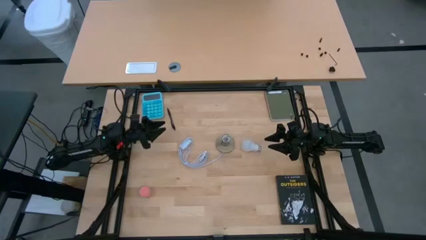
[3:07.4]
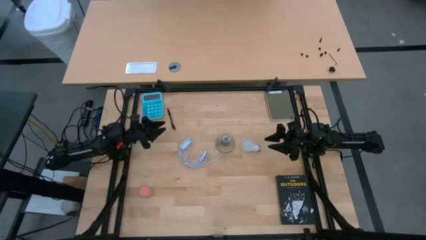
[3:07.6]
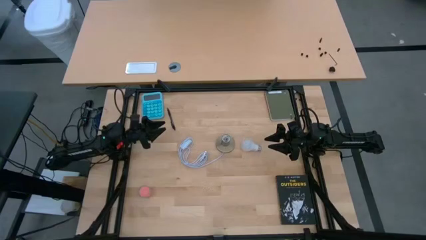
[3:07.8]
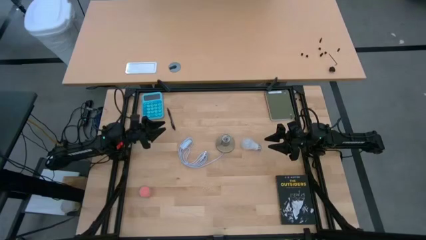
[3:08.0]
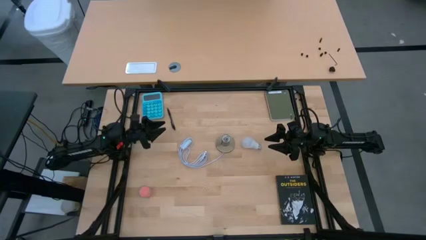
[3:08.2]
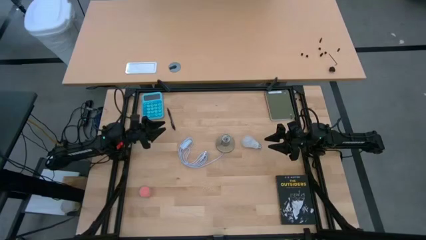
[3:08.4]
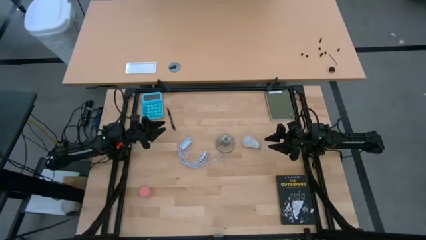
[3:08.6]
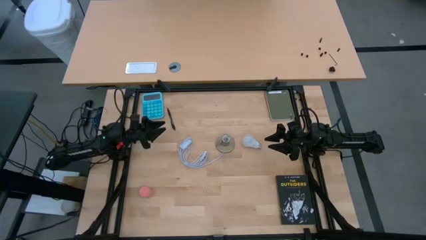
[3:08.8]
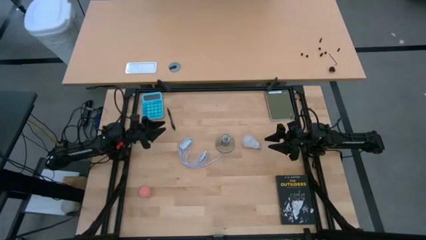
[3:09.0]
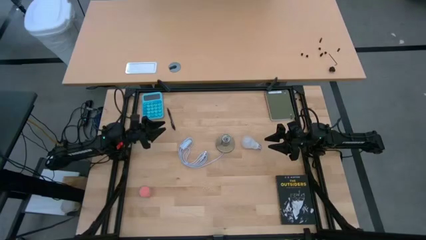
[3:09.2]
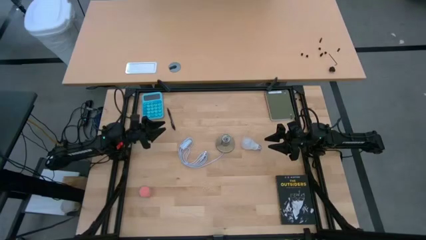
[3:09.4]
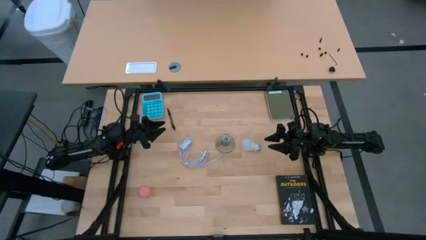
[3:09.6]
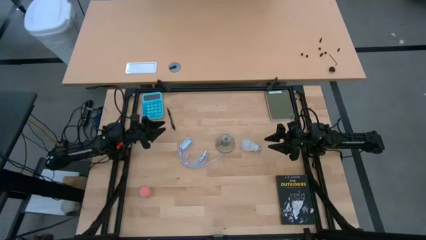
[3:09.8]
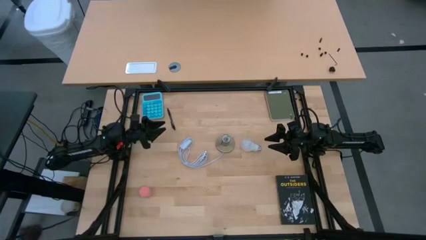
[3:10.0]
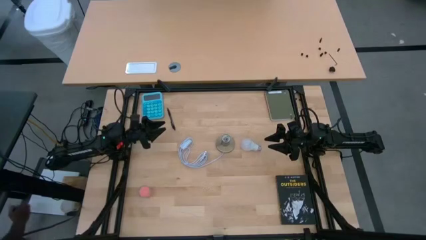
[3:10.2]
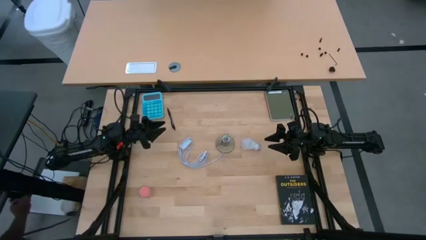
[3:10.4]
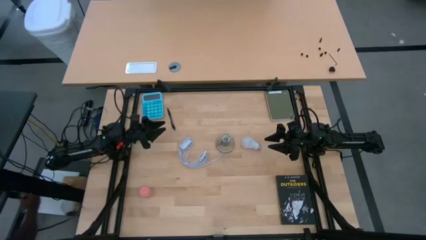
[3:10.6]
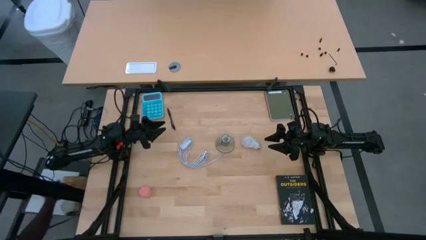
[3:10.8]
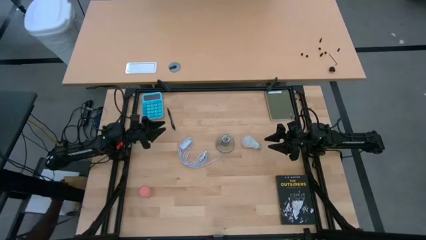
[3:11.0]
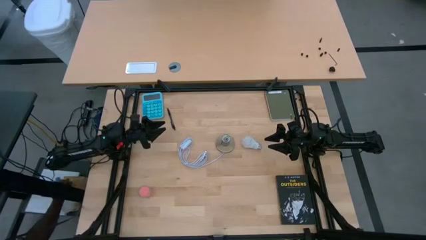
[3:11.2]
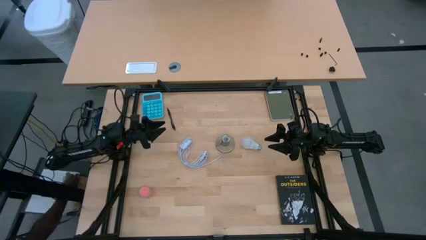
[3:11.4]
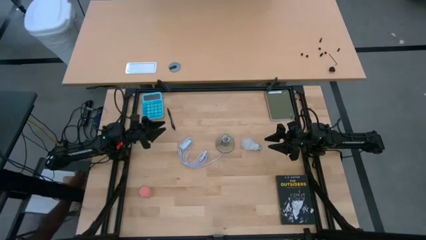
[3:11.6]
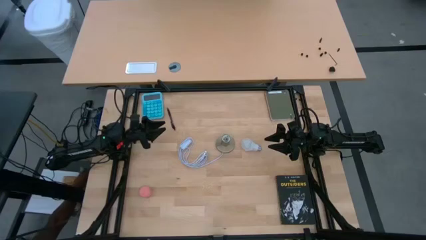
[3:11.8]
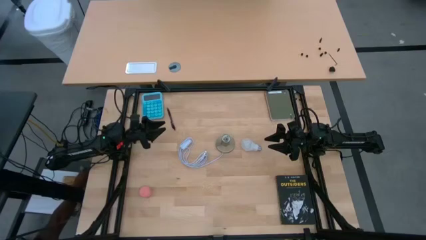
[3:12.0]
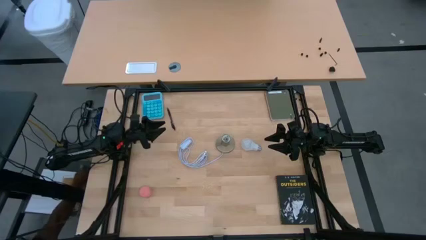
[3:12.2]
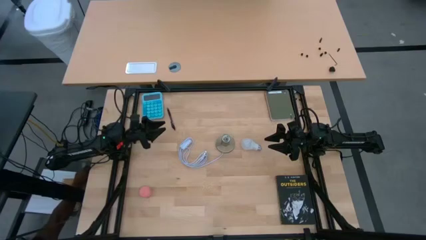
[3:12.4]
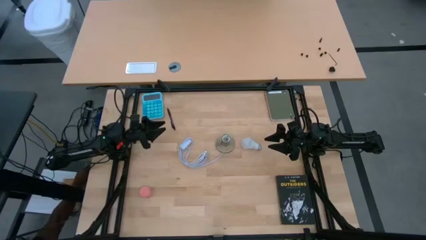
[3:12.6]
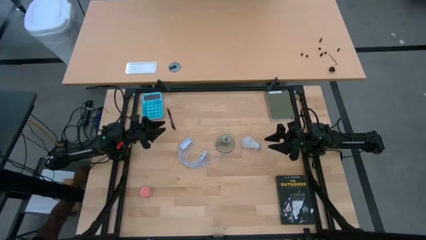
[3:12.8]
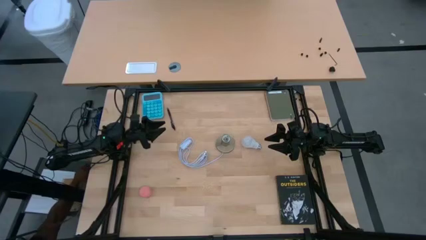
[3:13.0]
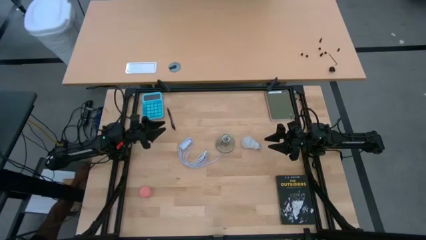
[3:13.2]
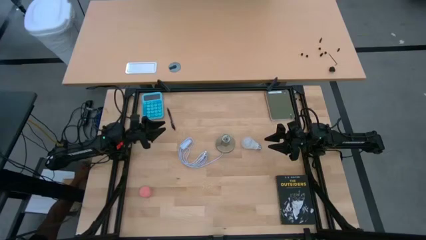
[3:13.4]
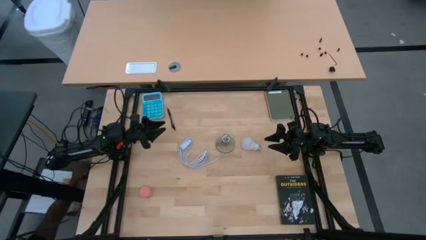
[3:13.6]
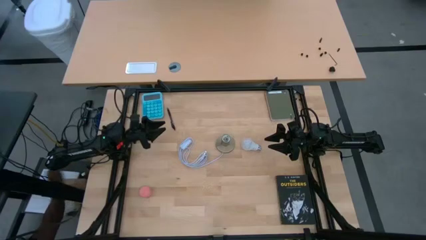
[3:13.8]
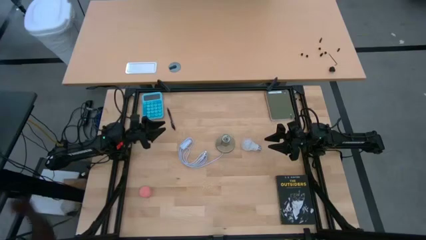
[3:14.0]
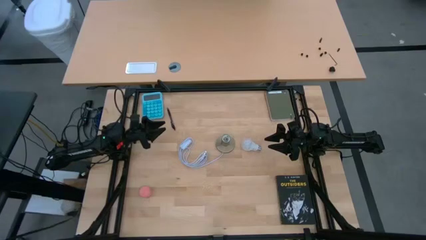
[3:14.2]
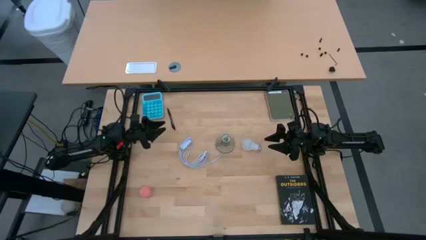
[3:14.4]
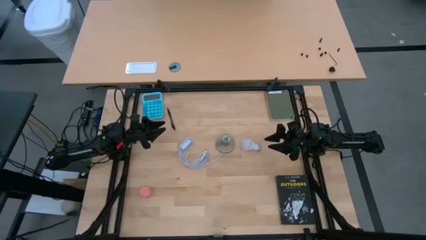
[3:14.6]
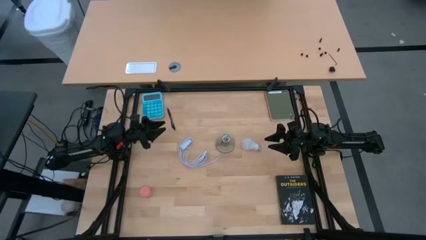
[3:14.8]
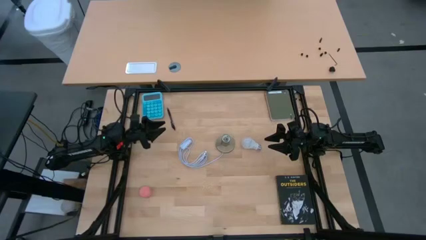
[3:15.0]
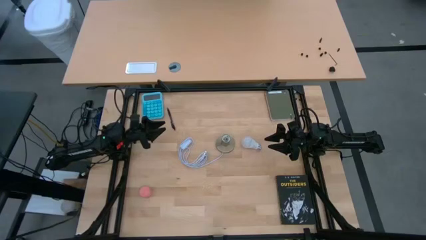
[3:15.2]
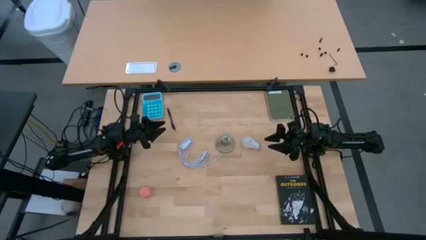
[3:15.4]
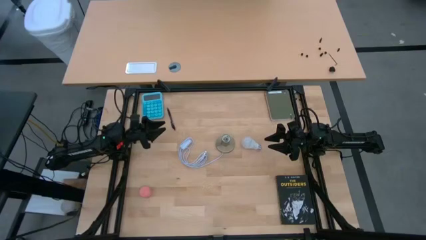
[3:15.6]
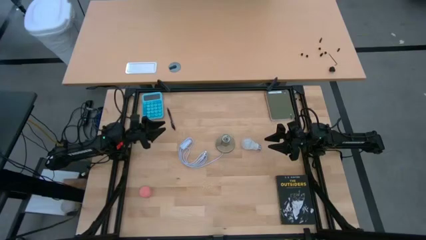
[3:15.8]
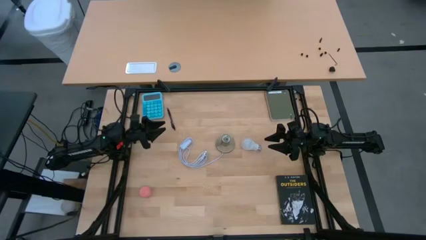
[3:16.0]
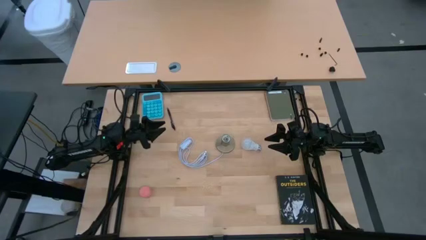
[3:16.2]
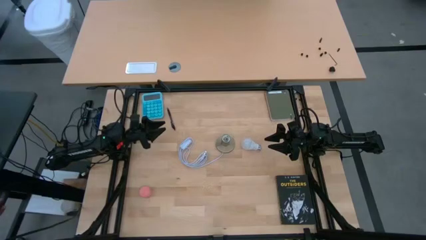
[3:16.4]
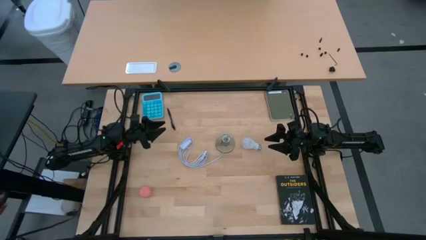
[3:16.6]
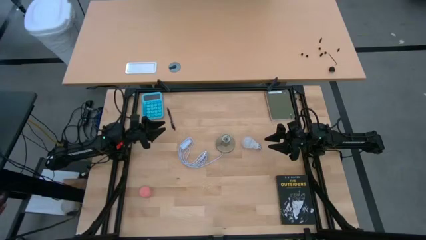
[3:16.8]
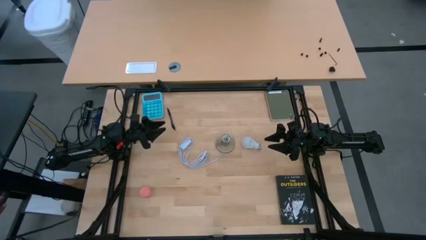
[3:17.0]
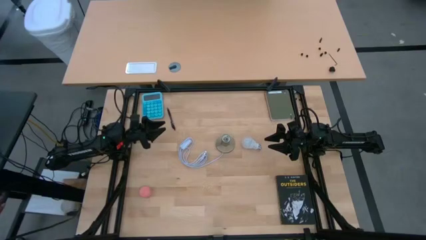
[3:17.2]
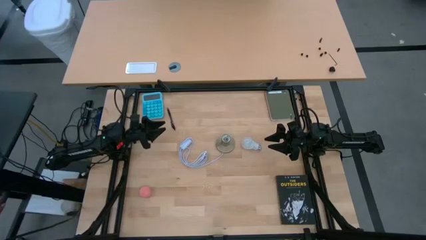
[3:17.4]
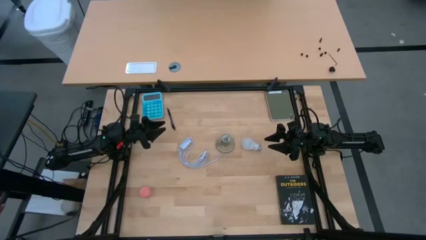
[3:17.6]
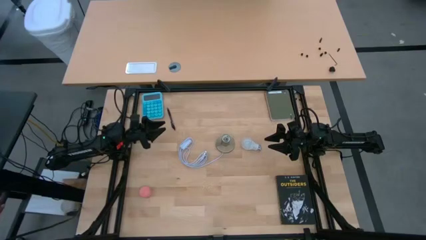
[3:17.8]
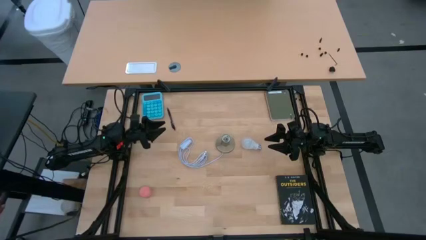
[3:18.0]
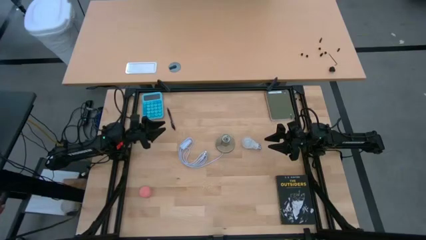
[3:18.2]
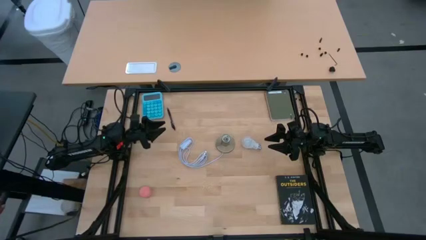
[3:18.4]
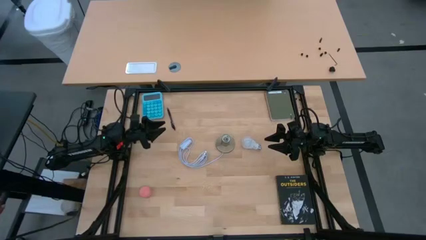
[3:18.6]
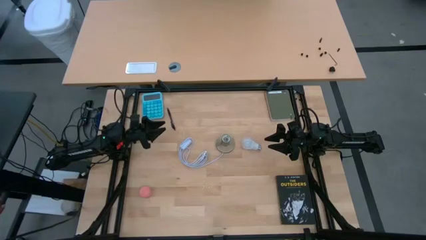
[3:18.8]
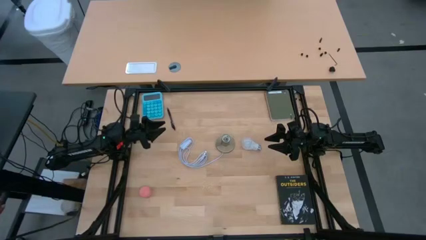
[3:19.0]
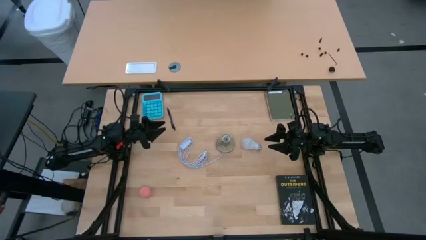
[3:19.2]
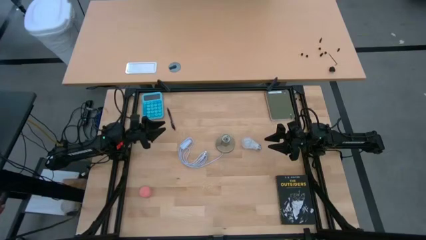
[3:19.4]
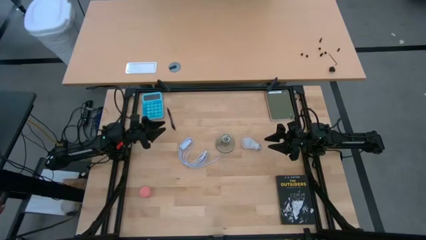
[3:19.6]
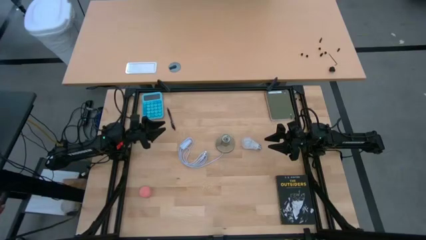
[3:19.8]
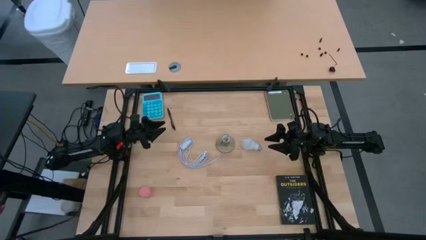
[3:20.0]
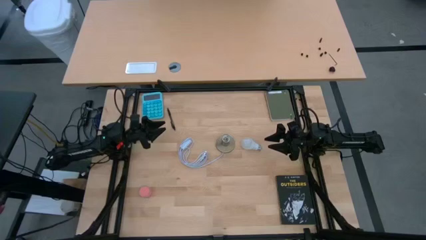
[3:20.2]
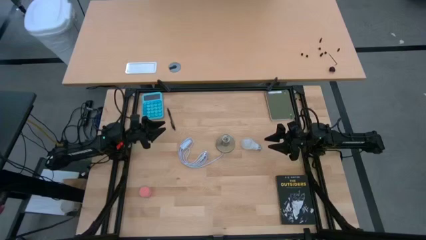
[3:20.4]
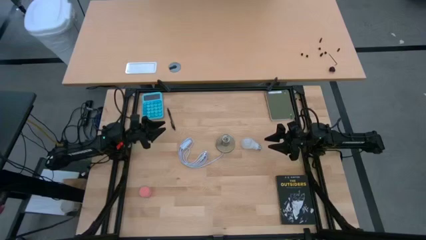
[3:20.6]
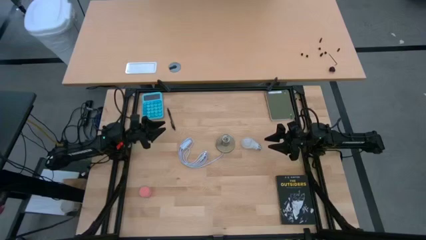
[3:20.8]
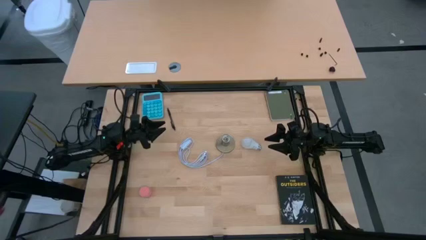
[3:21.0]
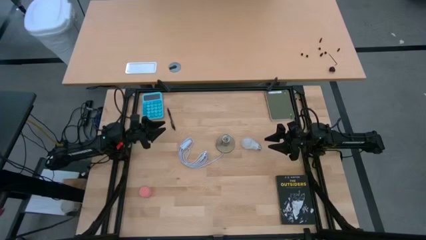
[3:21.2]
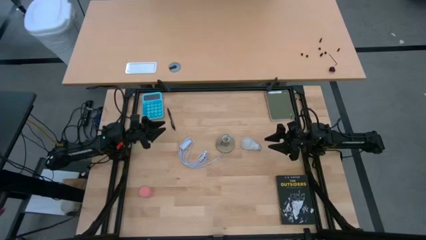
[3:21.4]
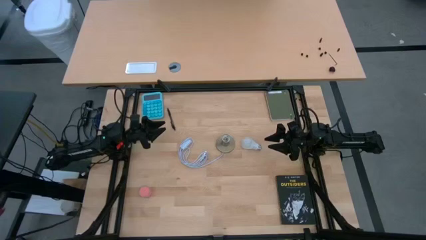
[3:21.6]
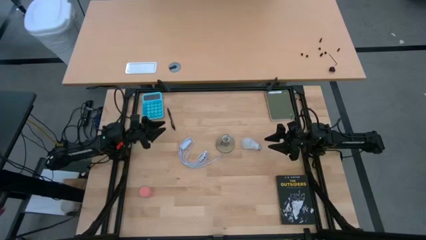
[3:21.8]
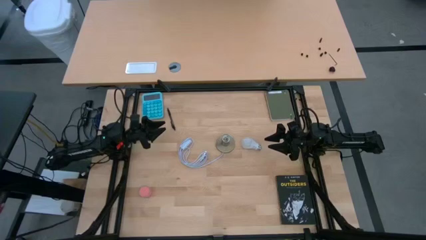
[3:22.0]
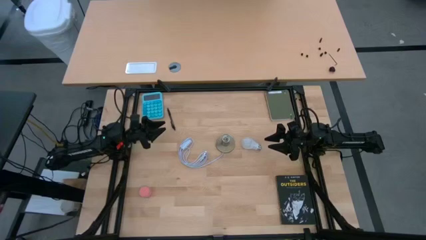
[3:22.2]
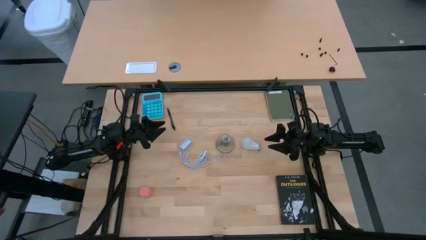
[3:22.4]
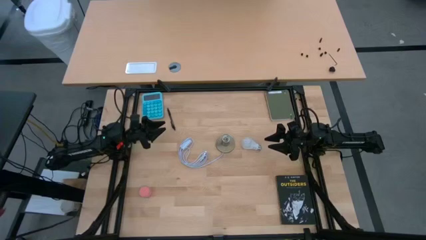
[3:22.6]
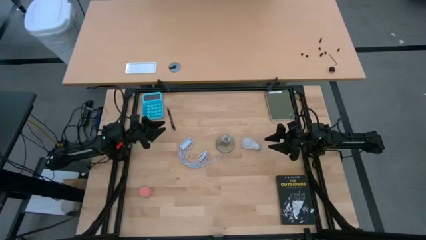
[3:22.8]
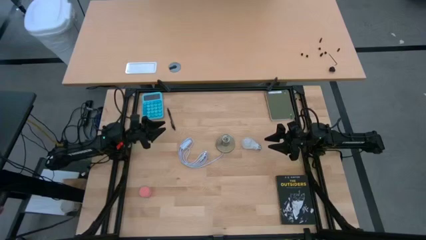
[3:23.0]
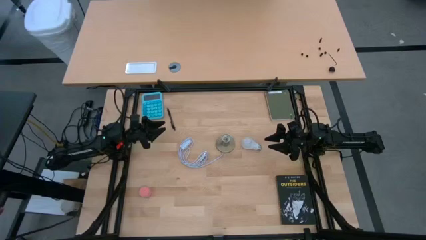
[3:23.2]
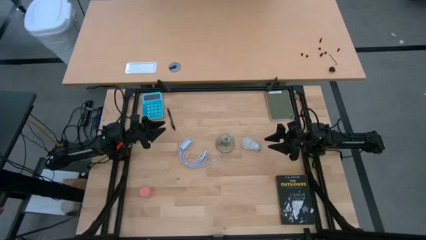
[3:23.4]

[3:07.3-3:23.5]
Task: Screw lightbulb
Return to Home Position

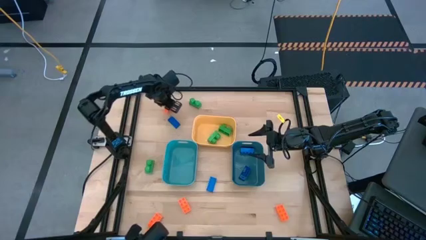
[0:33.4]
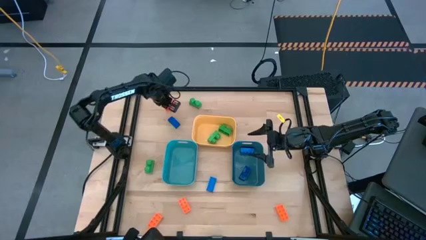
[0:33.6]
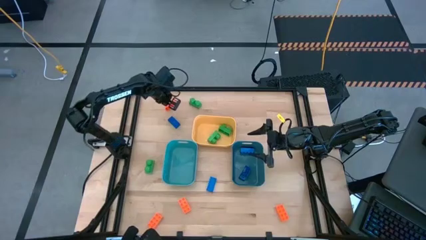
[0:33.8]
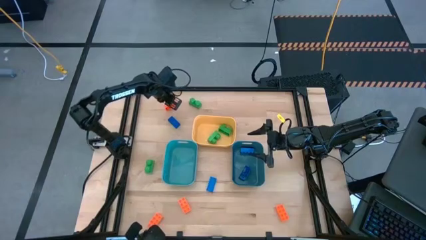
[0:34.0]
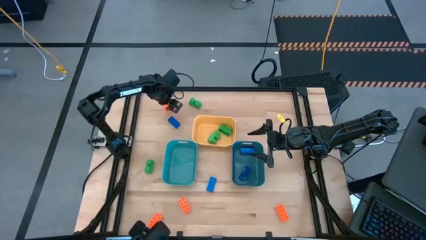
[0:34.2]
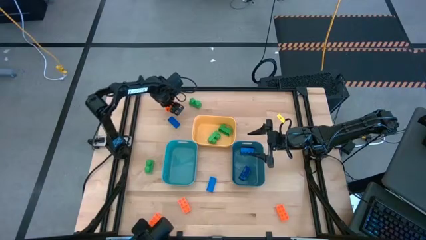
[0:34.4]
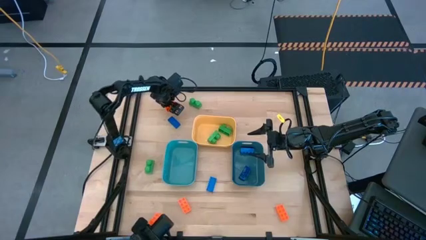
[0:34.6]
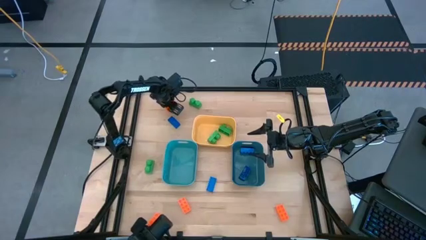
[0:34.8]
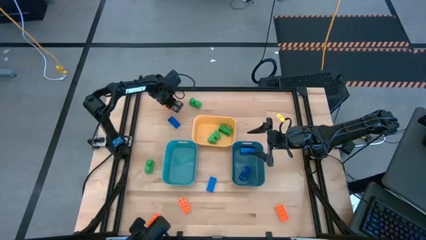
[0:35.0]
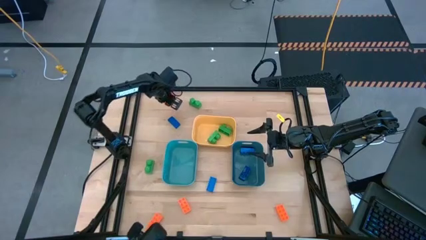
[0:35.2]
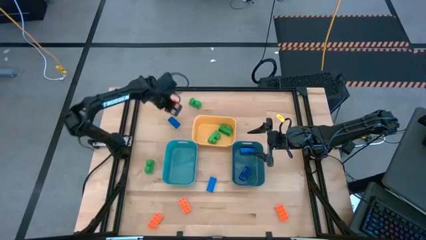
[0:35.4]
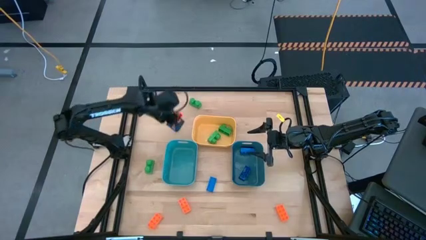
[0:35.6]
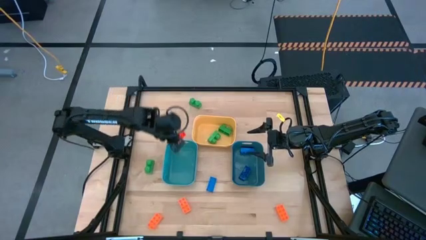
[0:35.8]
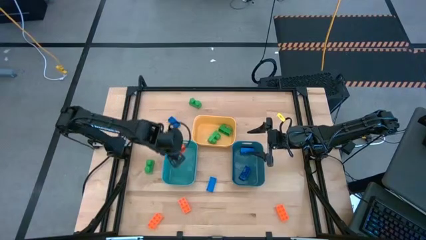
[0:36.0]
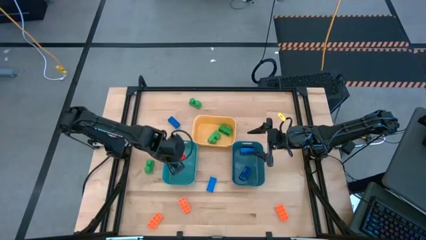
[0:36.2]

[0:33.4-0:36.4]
Task: Sort & place blocks by color
Put the orange game piece into the light blue bin
